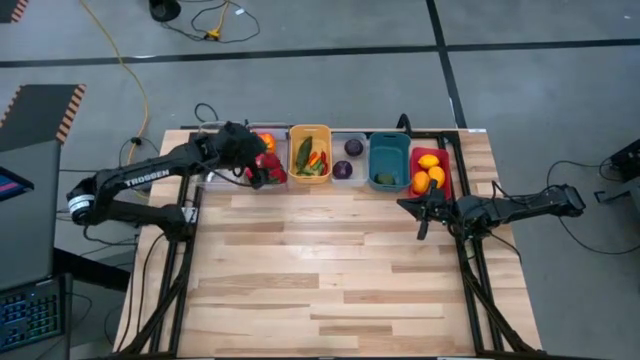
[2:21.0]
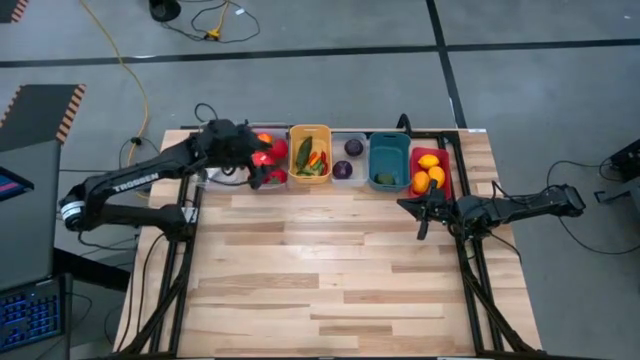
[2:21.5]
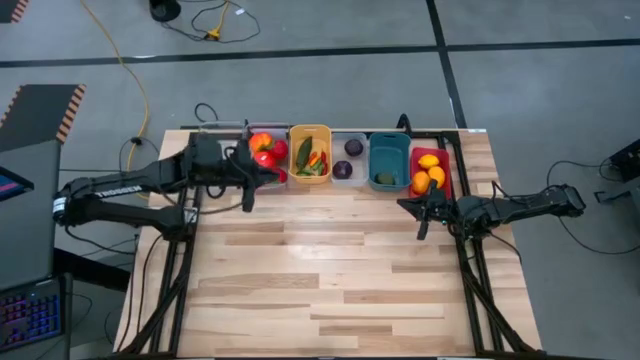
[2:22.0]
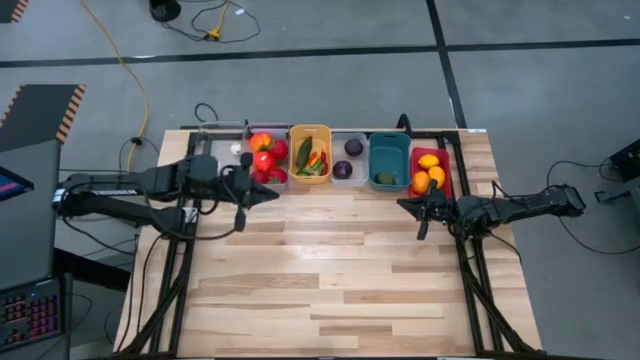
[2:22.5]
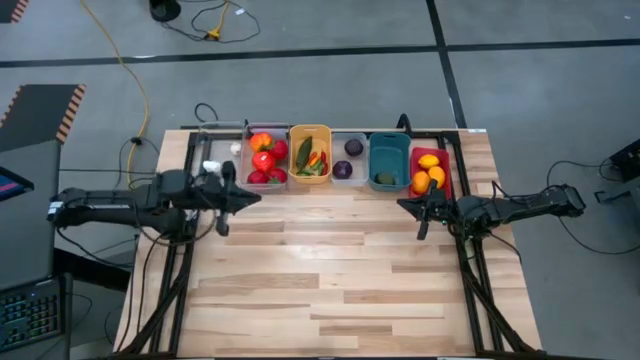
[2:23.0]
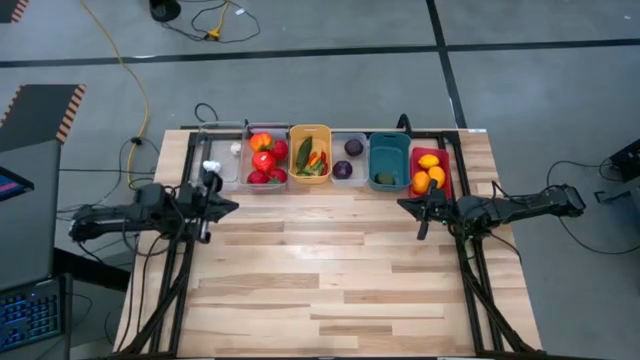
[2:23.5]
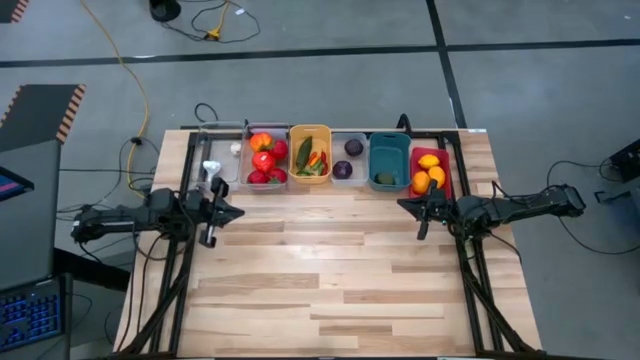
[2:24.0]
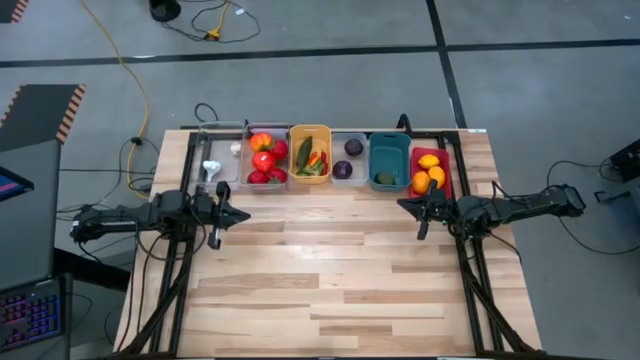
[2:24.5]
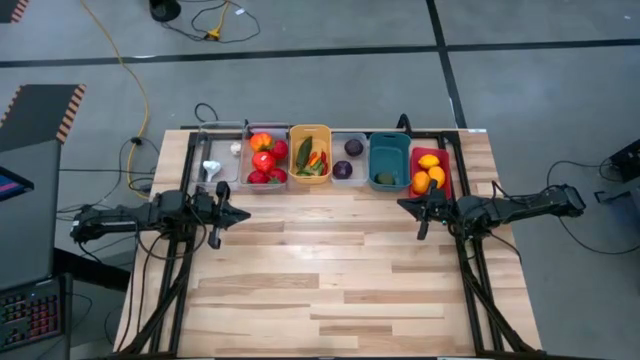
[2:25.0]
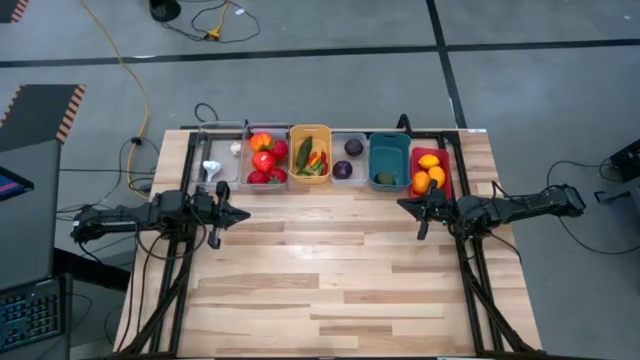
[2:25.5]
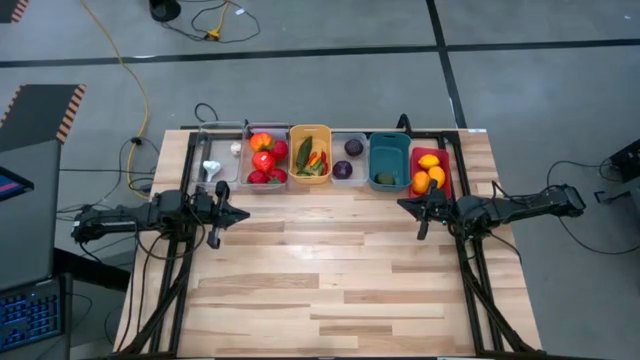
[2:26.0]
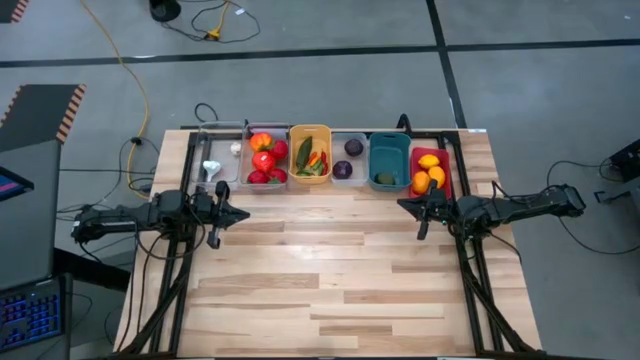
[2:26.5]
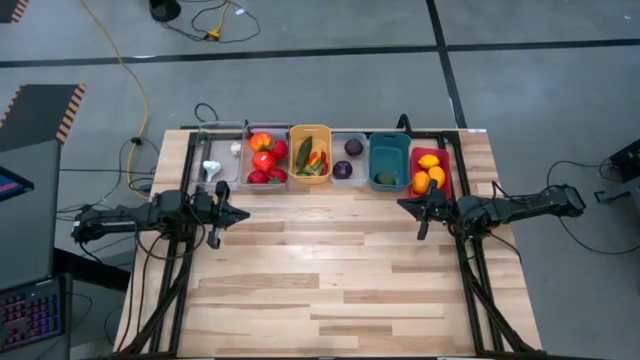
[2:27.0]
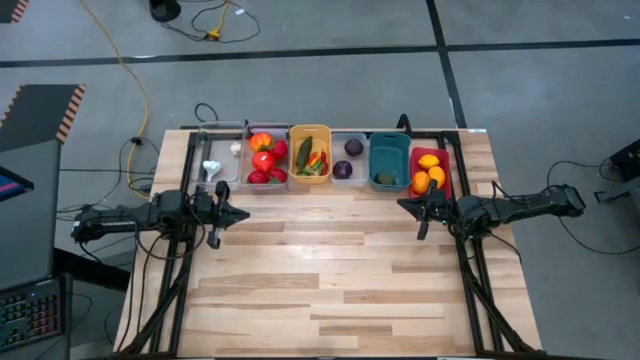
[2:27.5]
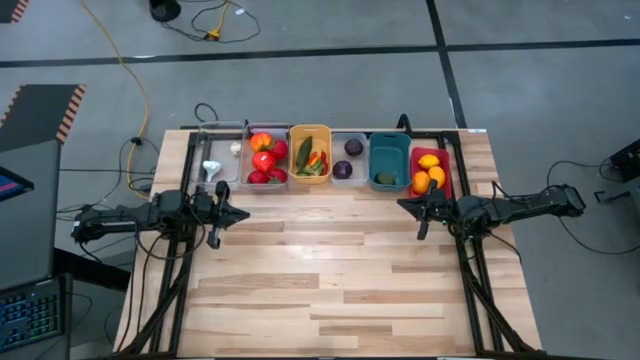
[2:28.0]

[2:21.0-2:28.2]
Task: Sort produce into baskets
Return to Home Position

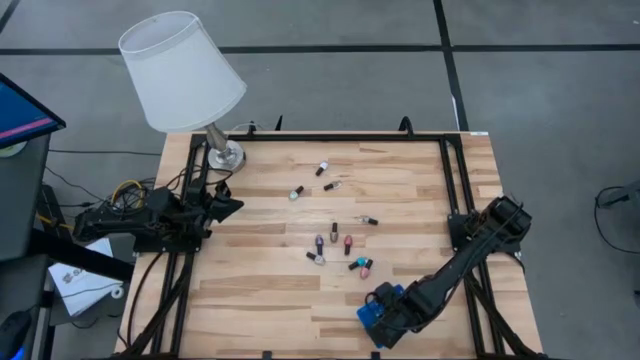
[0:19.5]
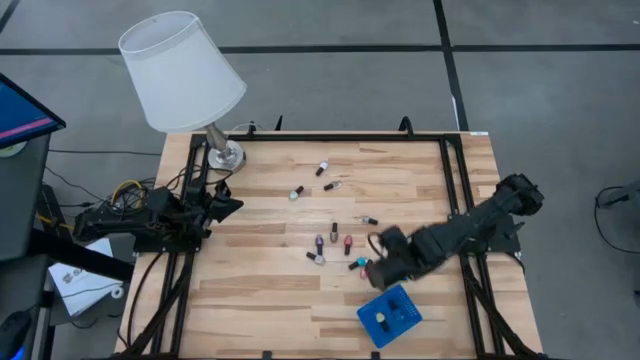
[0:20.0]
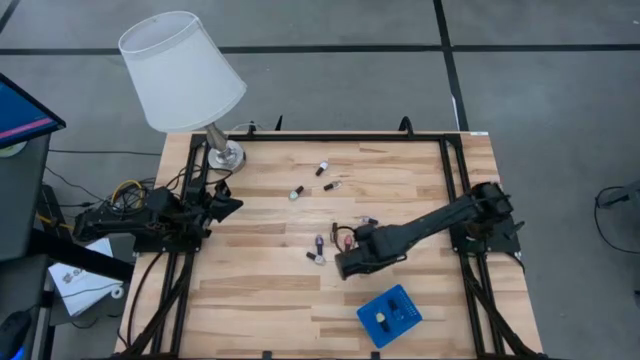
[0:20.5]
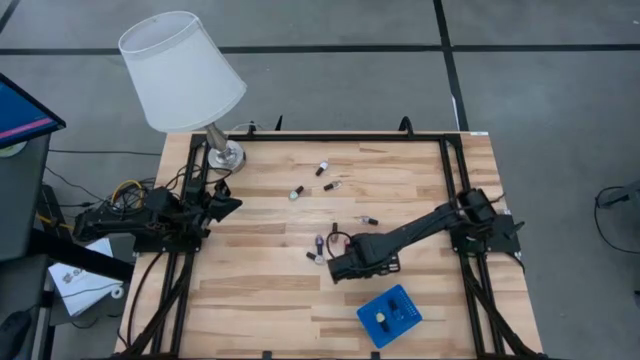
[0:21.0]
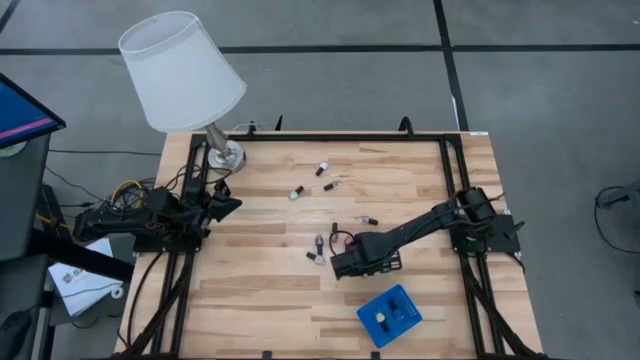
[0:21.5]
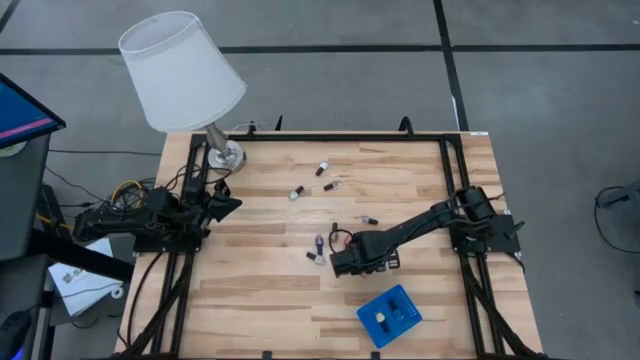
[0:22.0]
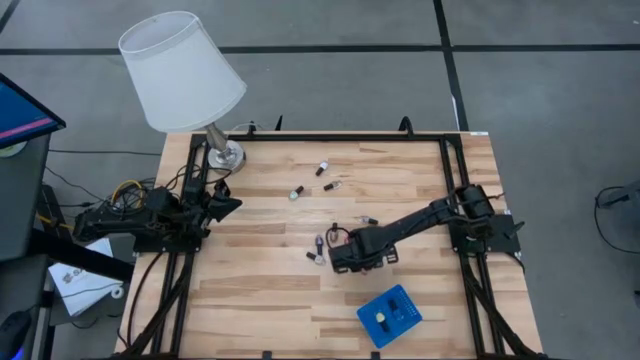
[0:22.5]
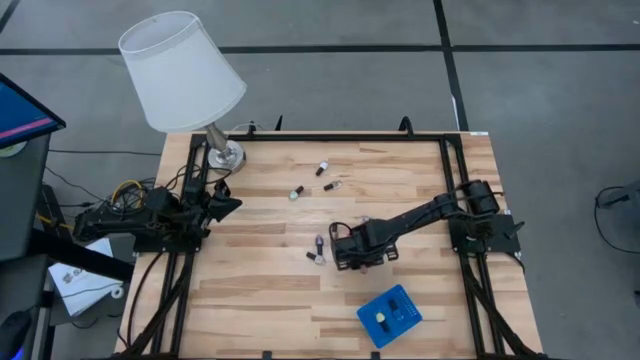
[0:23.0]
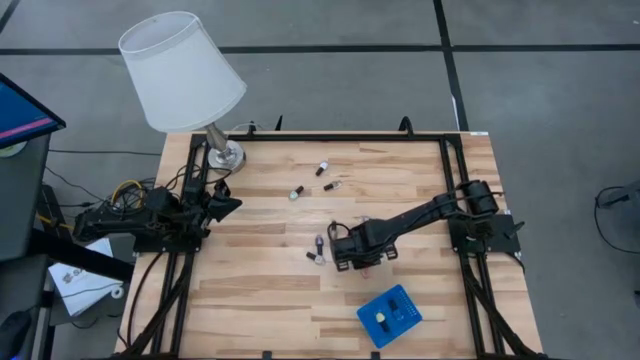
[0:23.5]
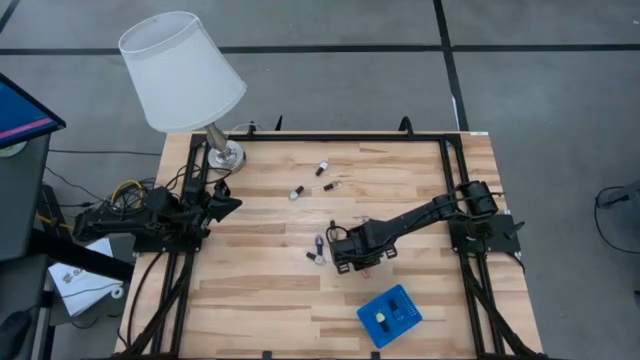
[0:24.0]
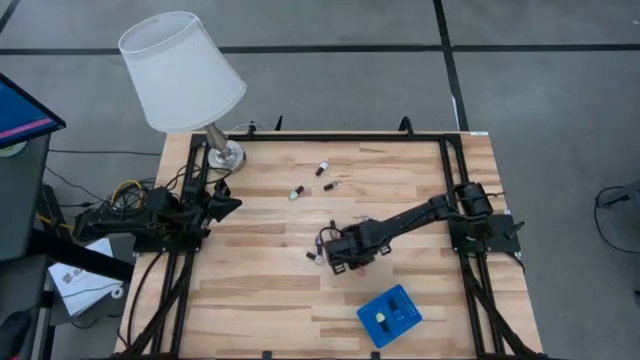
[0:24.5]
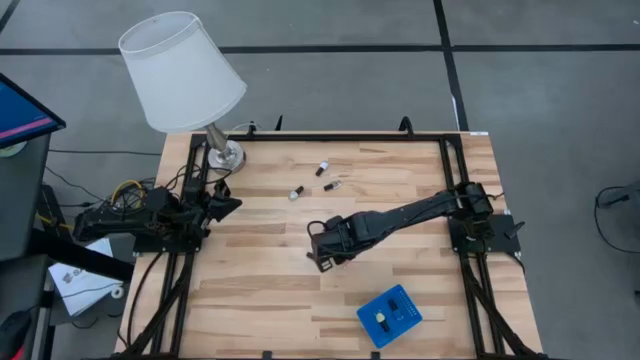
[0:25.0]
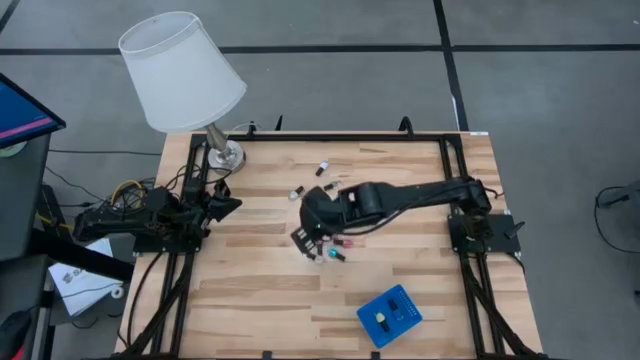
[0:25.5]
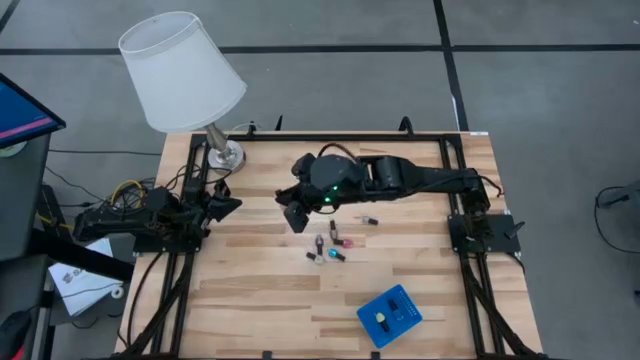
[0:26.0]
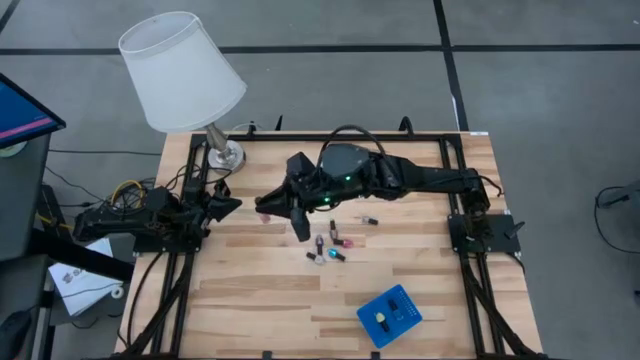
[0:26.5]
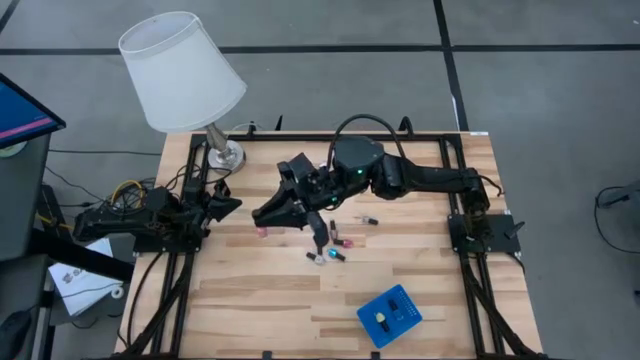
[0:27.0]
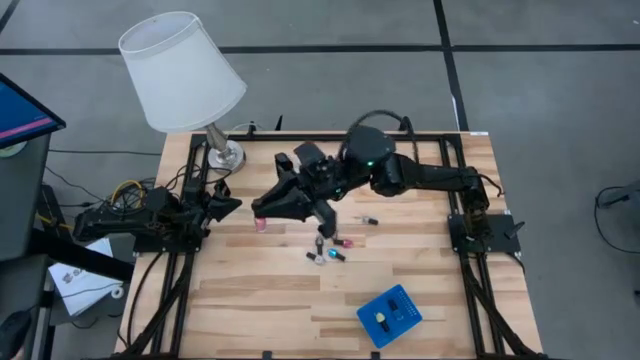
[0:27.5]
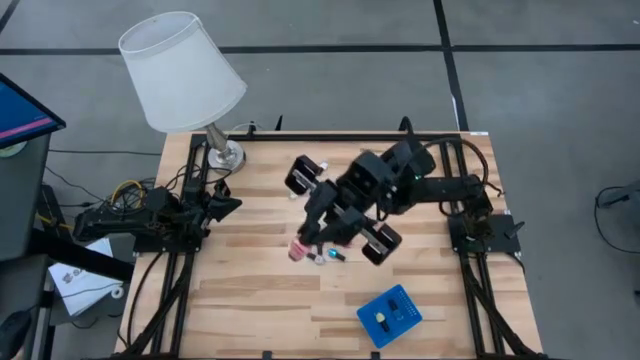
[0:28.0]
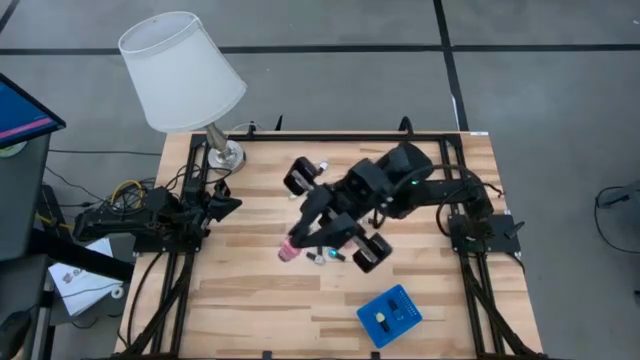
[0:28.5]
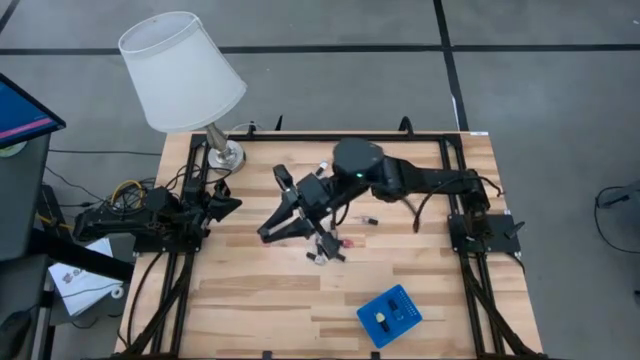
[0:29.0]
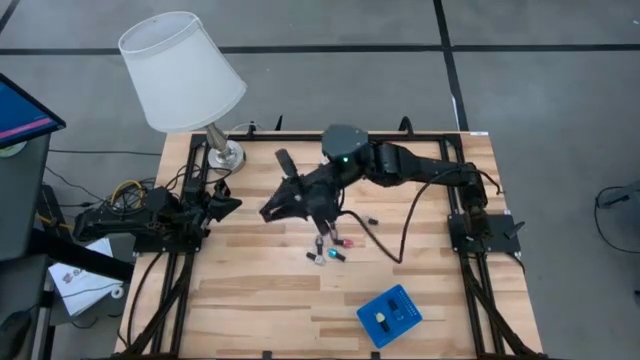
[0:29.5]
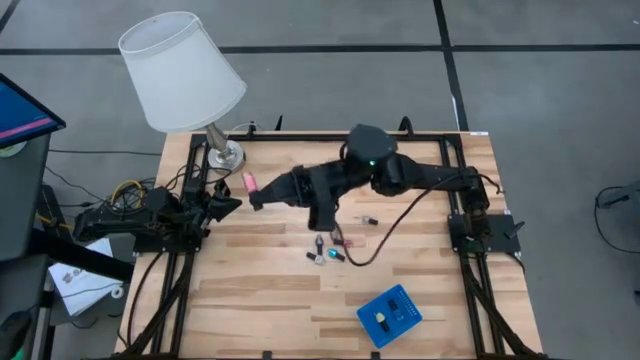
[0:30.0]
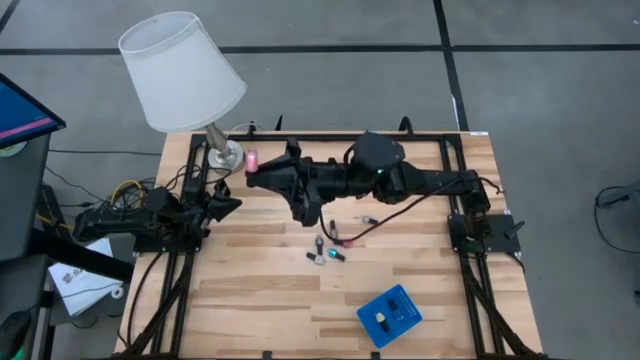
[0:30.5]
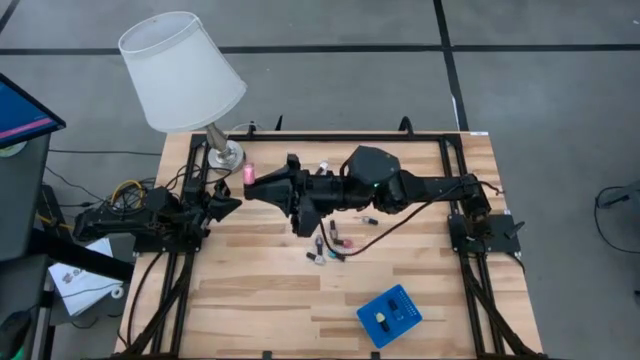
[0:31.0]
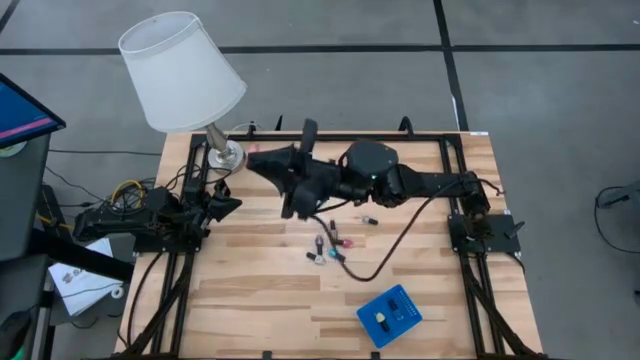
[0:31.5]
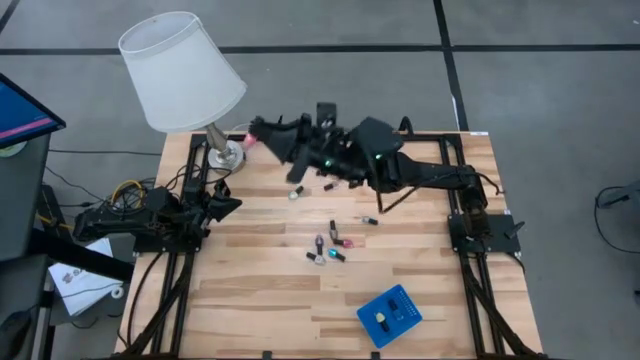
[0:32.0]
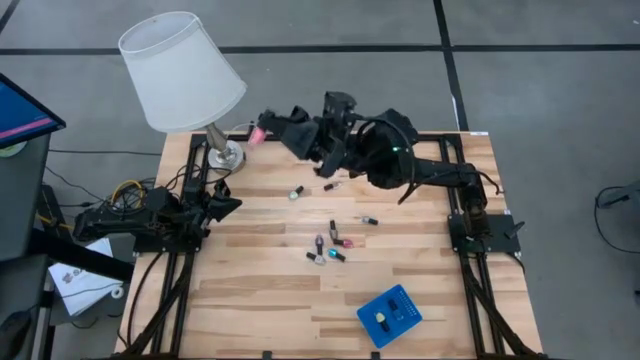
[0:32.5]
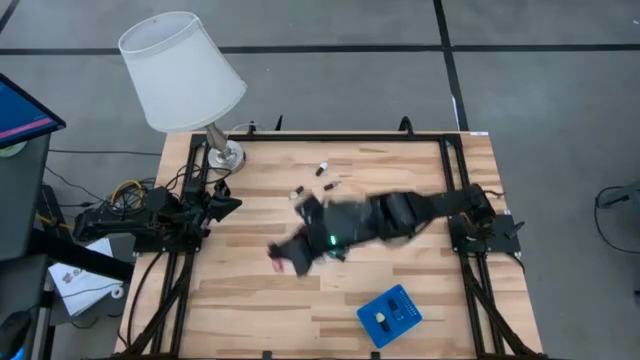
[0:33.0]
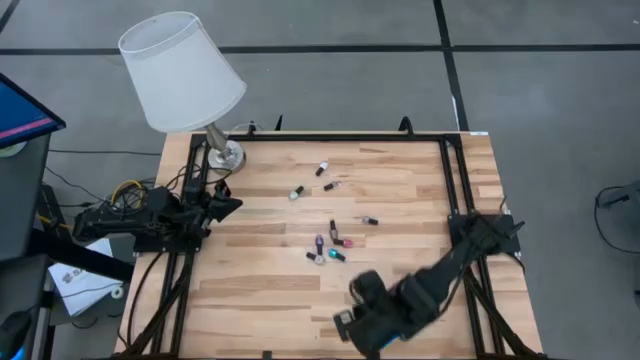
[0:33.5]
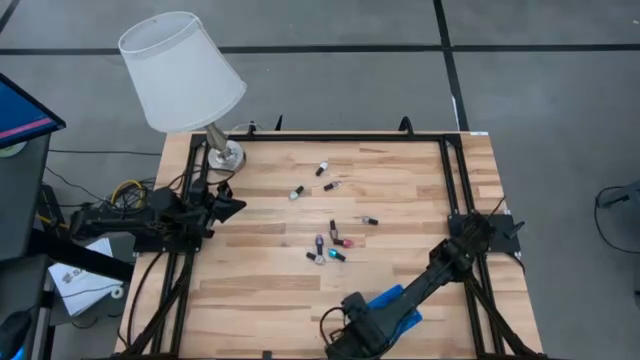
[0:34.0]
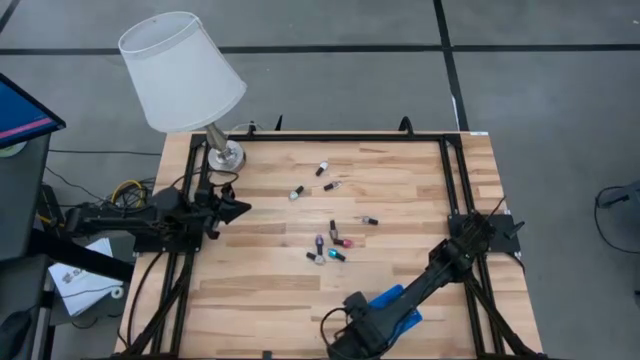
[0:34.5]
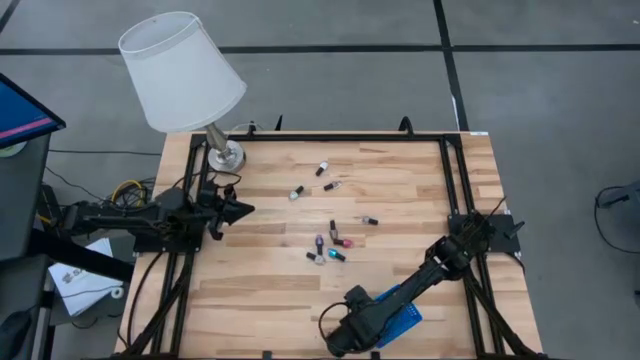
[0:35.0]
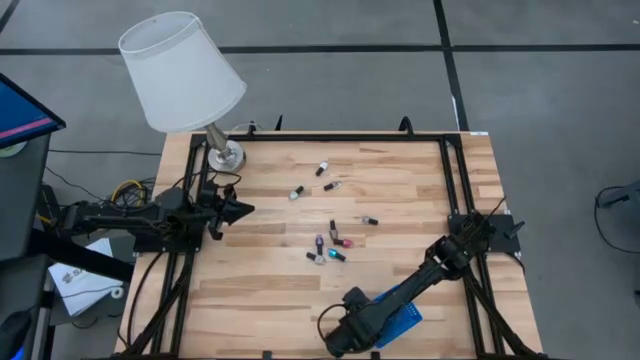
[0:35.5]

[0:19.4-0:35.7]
Task: Pick & Place Nail Polish
Put the pink nail polish into the blue bin
